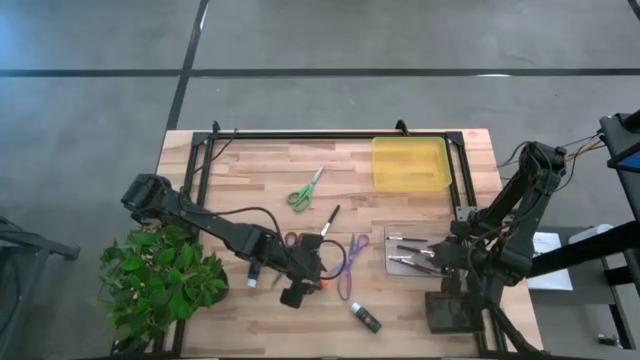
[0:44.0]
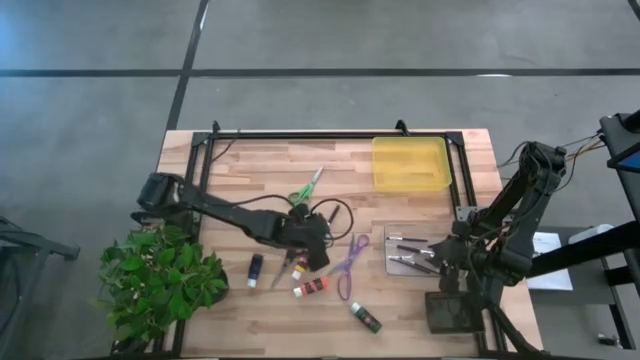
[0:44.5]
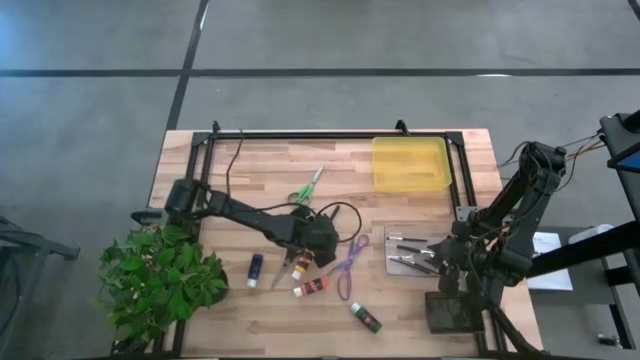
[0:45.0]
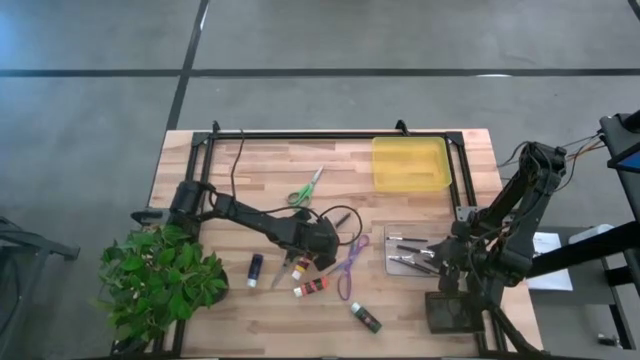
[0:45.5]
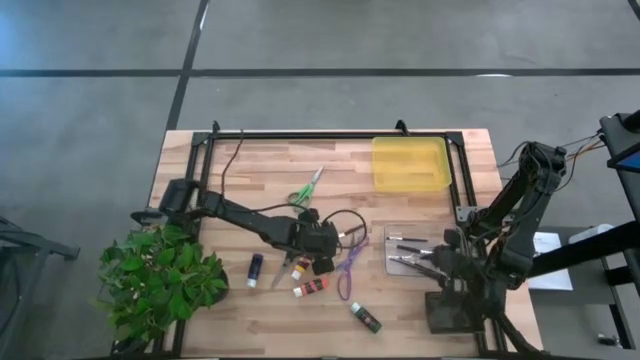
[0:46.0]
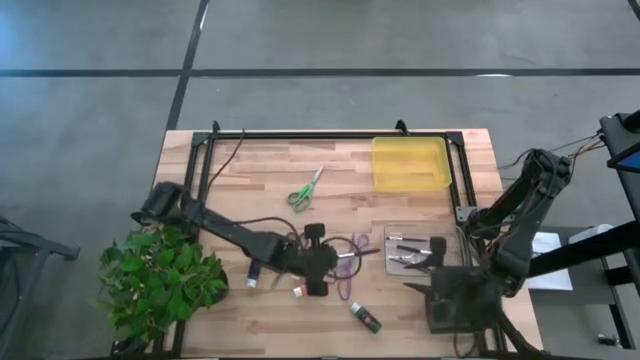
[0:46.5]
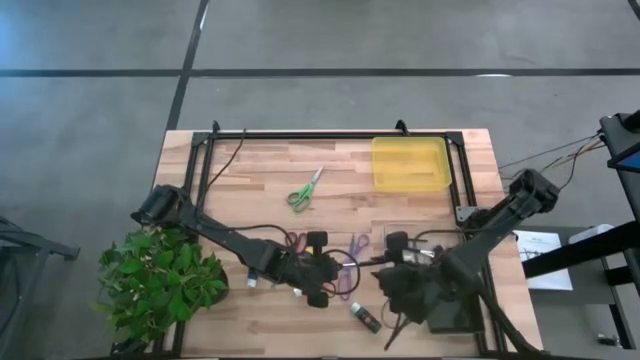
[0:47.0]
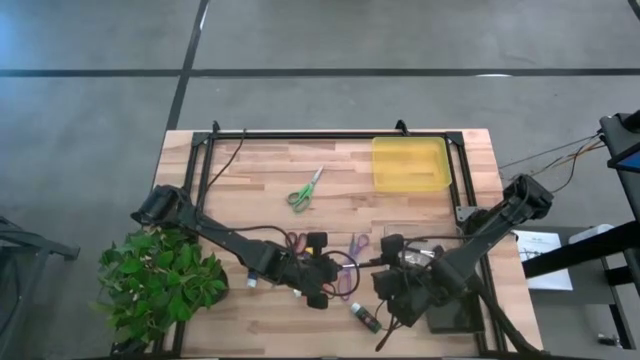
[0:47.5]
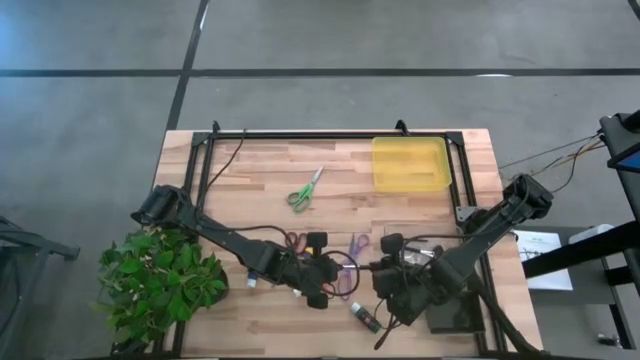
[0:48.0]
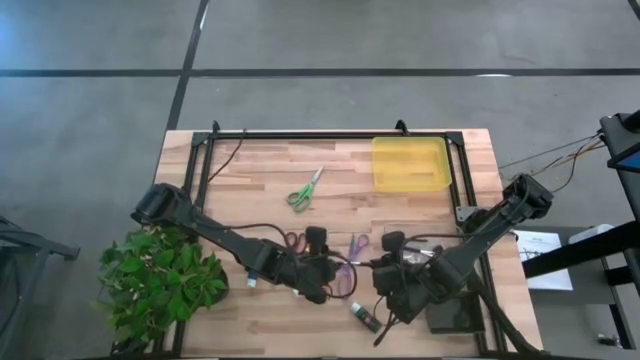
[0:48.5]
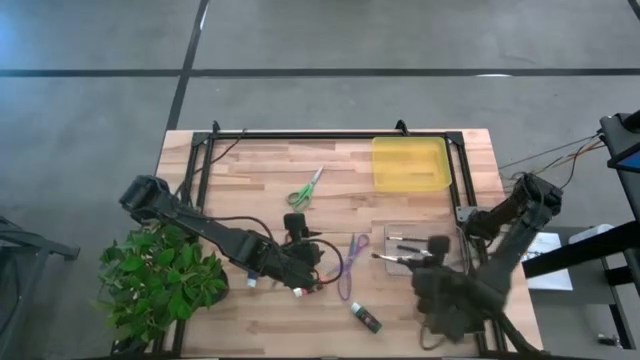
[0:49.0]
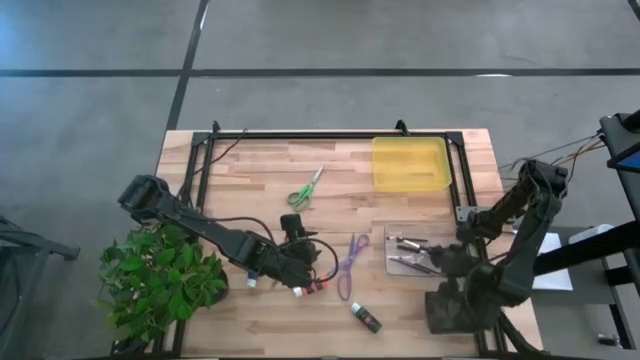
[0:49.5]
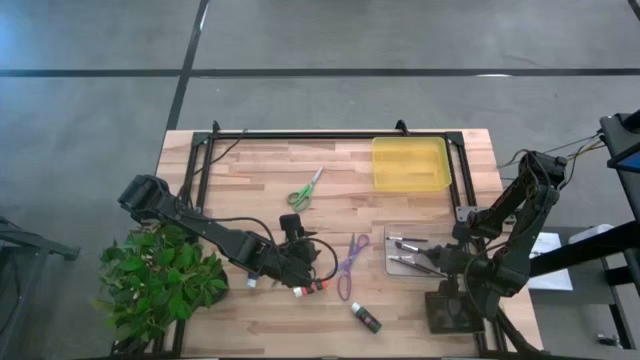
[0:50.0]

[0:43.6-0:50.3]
Task: Pick & Place Paint Supplies
Put the blush brush into the transparent bin

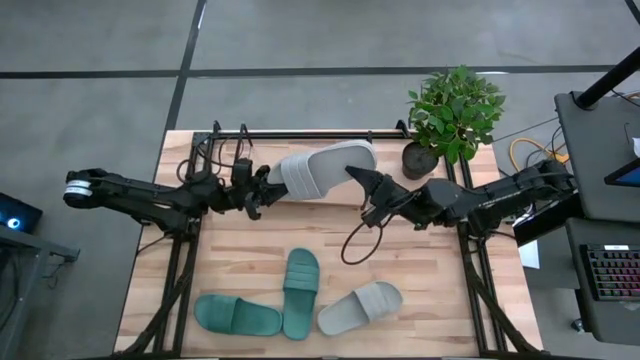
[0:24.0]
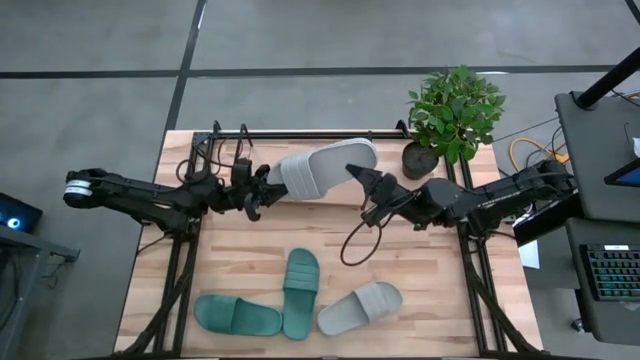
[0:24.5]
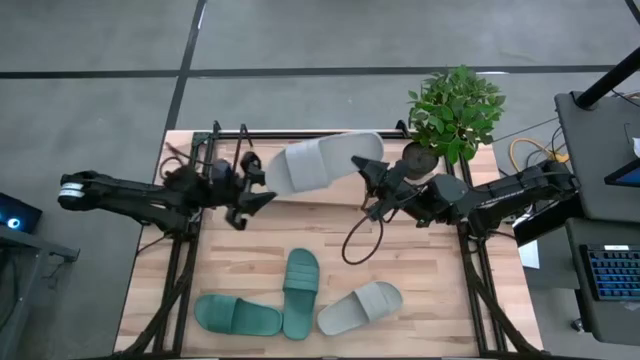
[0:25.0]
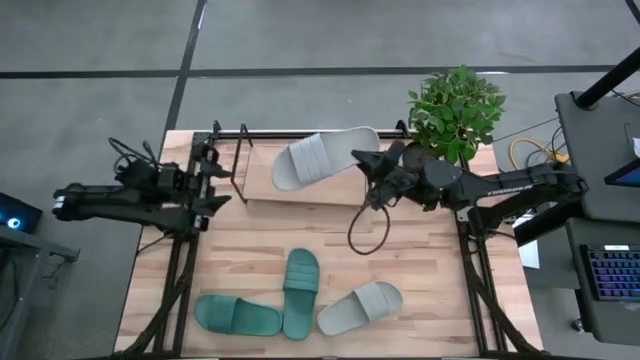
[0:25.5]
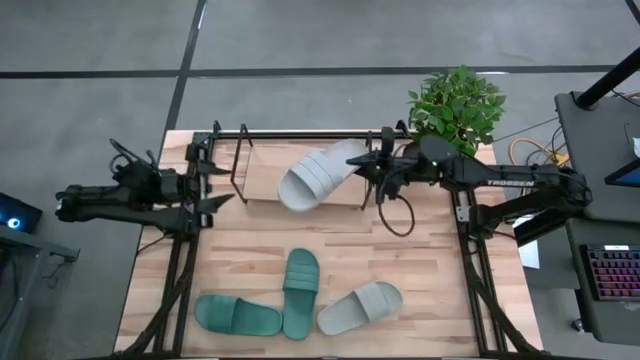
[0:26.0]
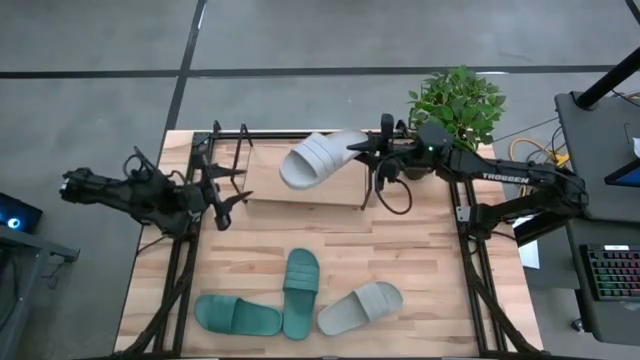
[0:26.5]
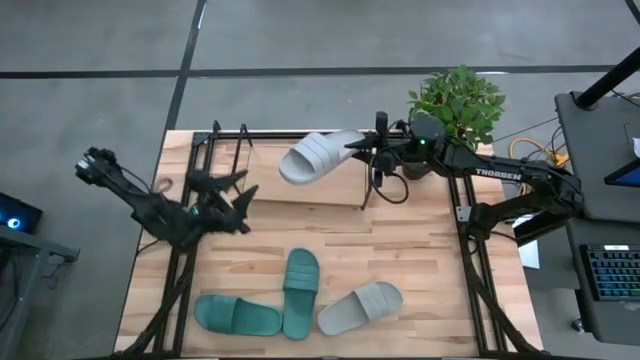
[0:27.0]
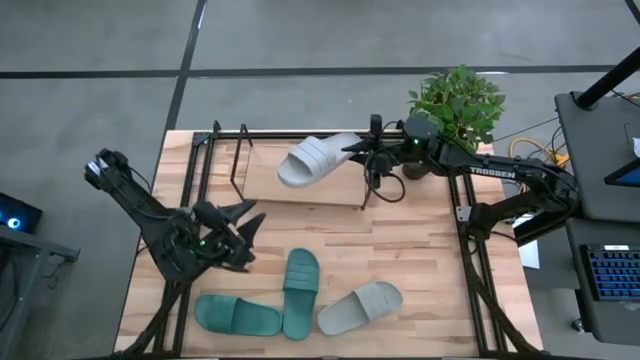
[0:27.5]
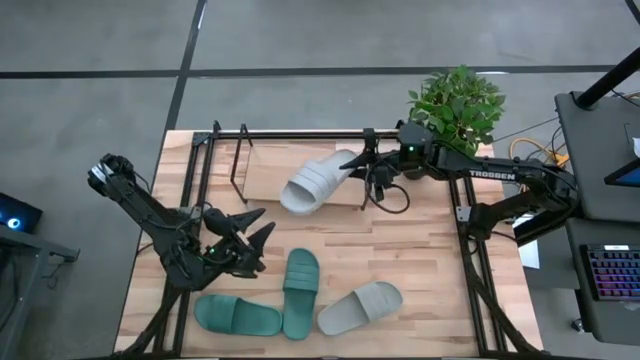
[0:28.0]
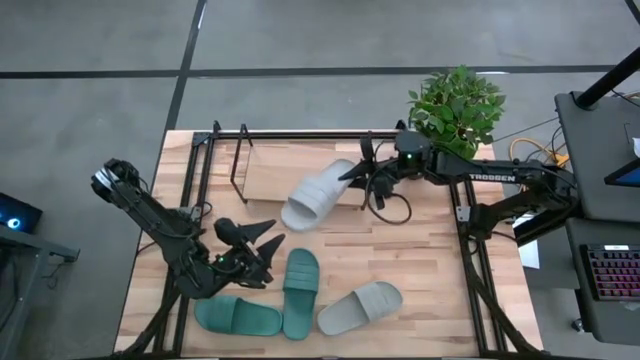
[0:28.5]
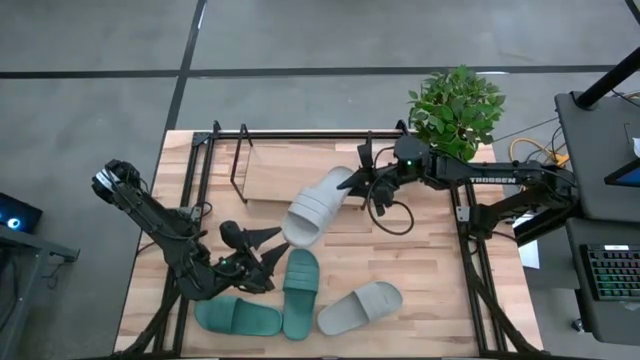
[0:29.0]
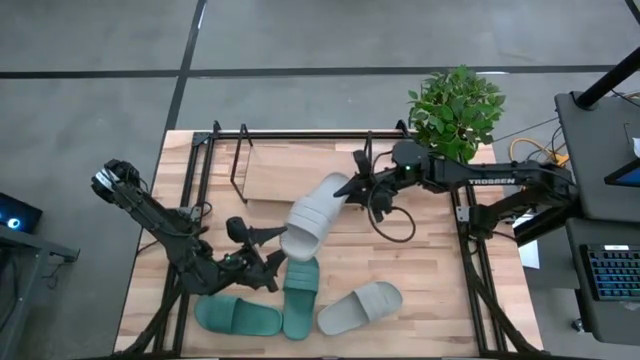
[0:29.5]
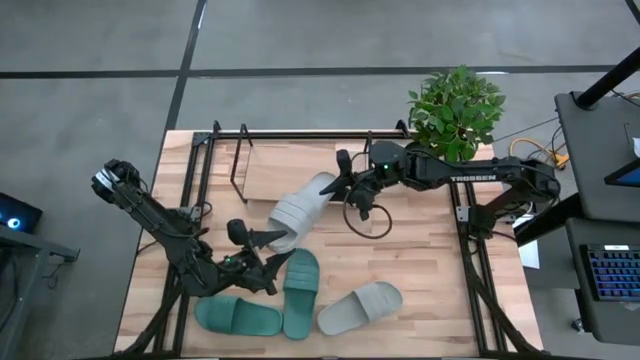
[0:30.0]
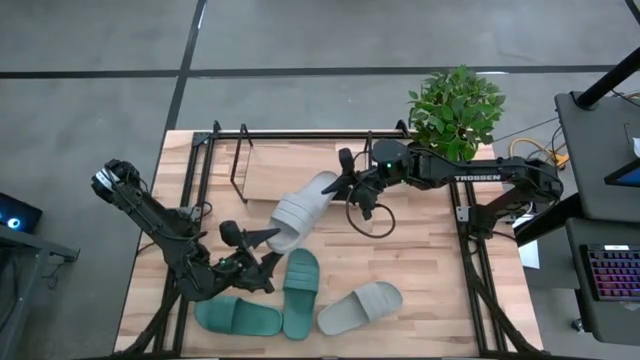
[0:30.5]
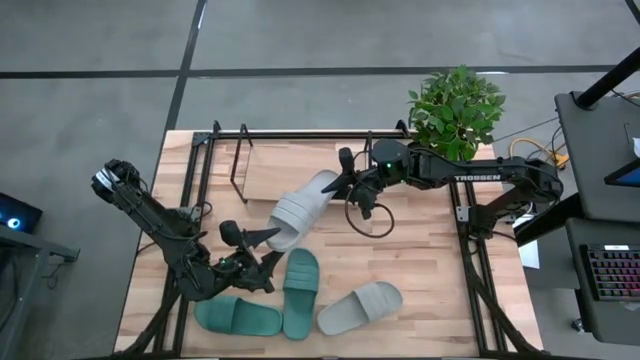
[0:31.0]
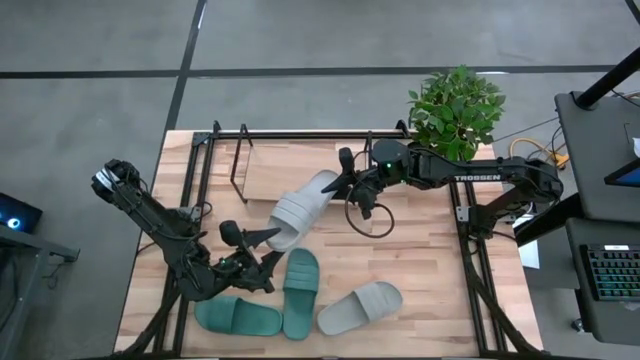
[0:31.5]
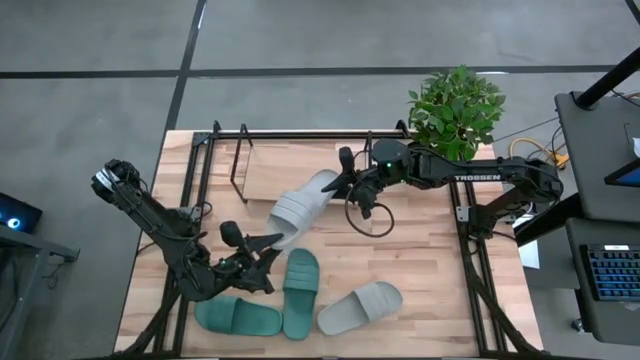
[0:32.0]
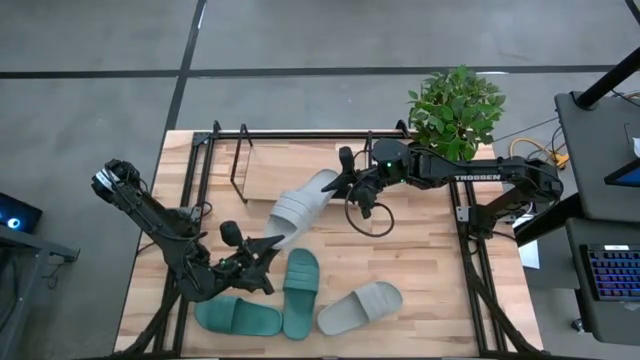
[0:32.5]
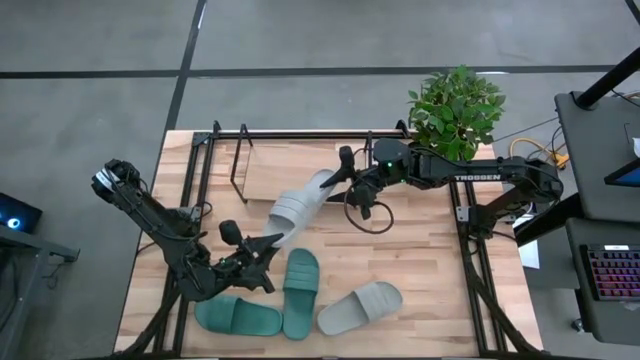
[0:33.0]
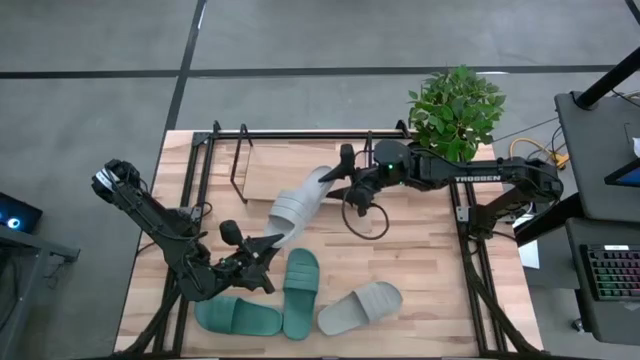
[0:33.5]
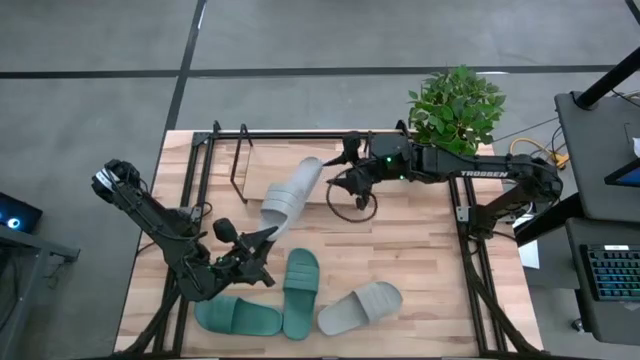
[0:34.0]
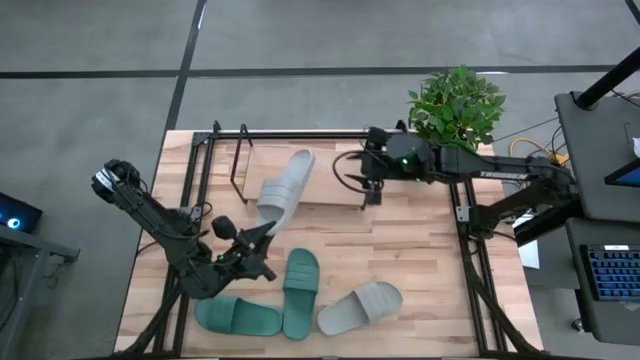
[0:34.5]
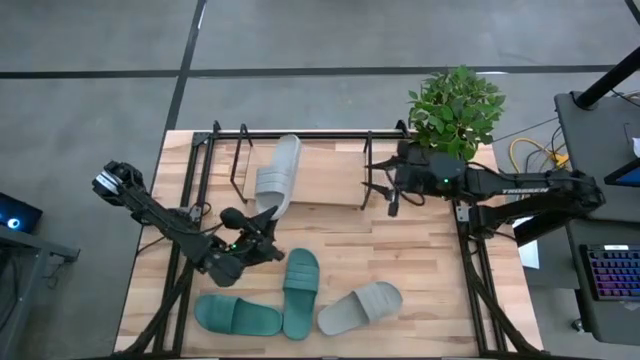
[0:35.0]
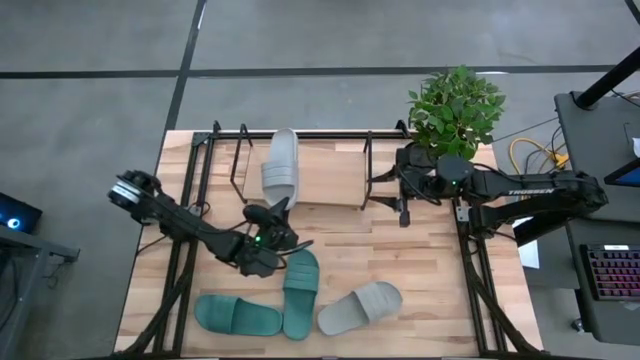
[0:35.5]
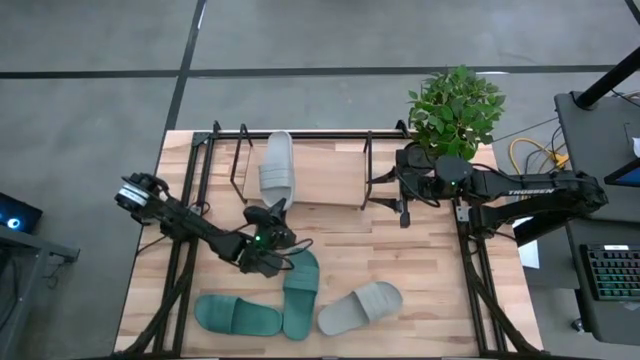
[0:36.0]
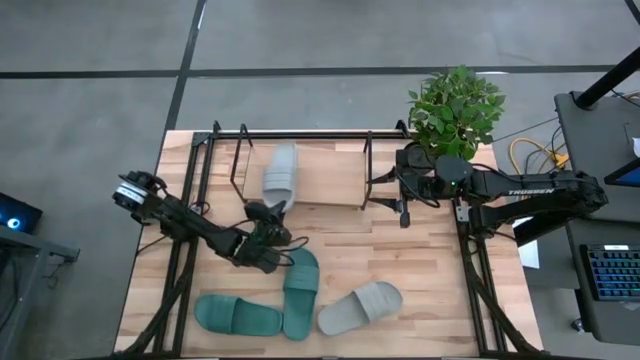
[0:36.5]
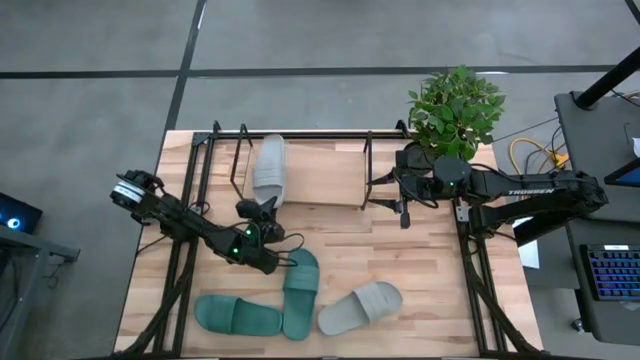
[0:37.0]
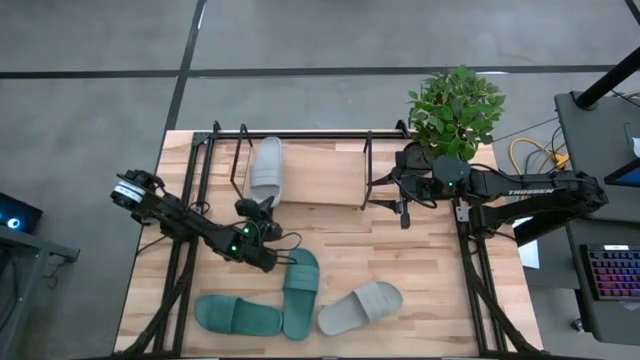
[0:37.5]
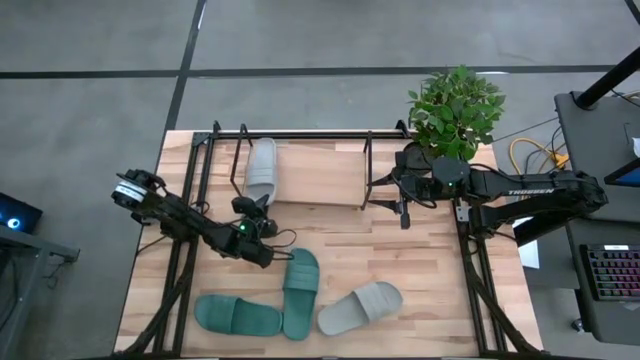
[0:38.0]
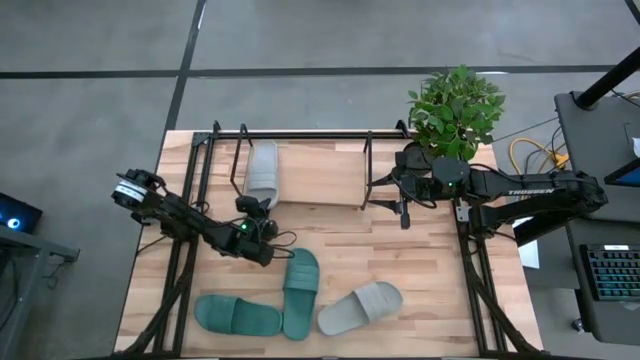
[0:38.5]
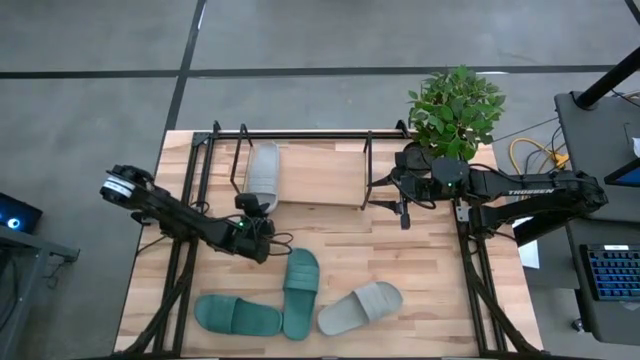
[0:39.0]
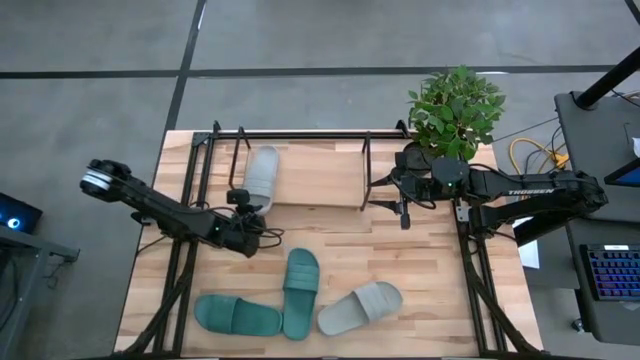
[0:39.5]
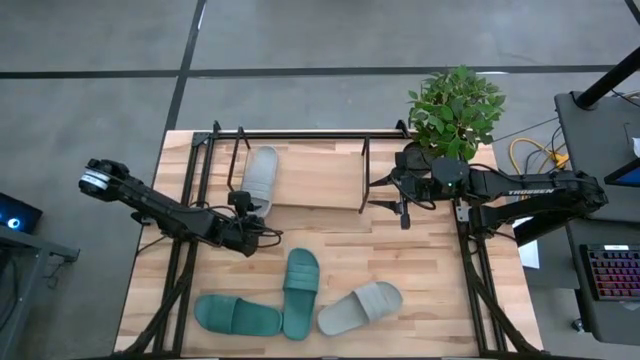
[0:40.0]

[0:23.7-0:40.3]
Task: Pick and place slides into the shelf
Put the right grey slide on the shelf
